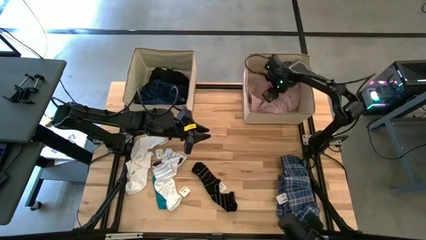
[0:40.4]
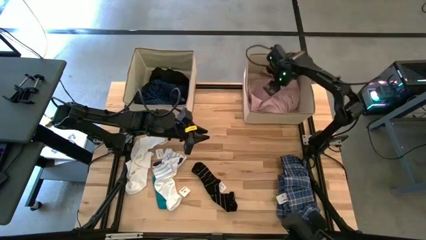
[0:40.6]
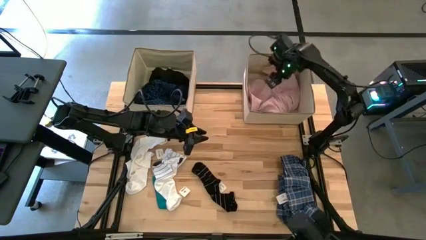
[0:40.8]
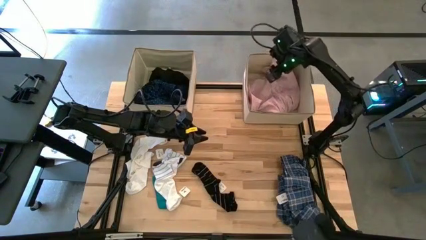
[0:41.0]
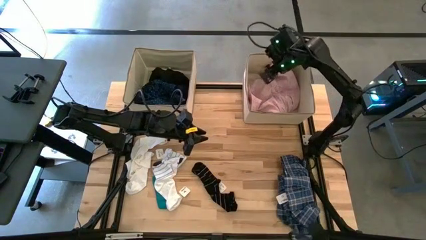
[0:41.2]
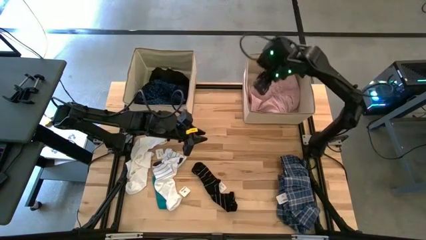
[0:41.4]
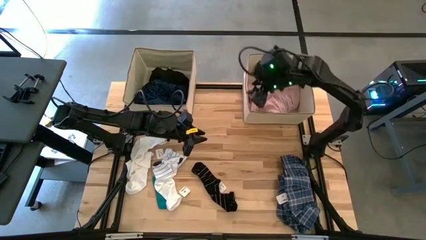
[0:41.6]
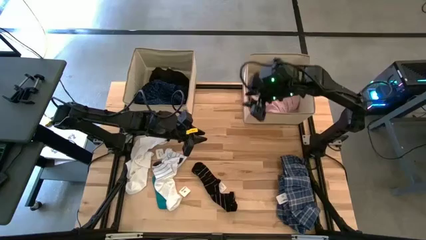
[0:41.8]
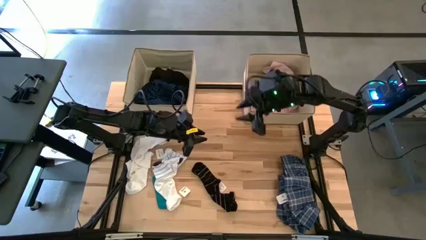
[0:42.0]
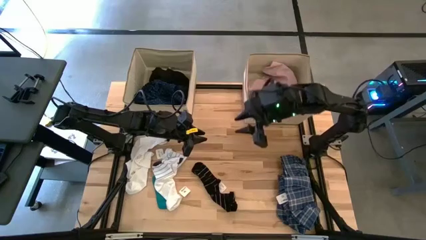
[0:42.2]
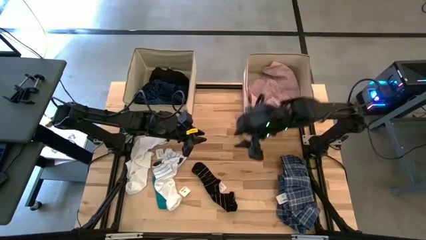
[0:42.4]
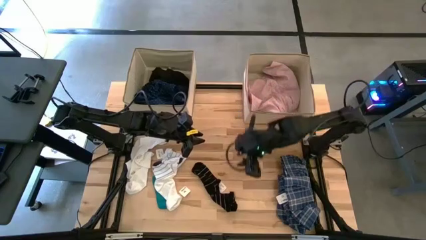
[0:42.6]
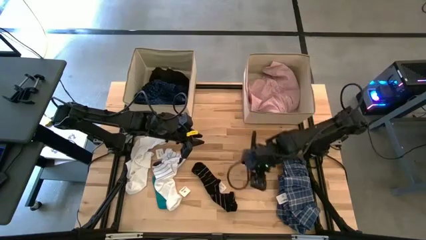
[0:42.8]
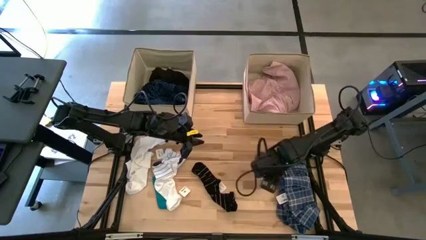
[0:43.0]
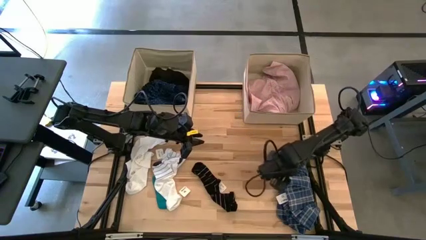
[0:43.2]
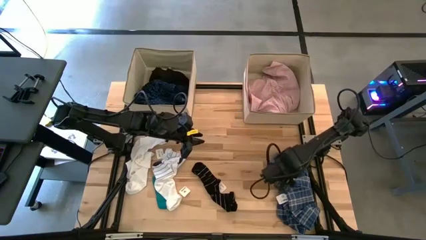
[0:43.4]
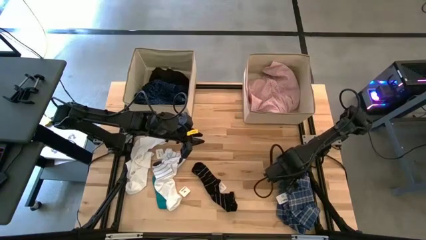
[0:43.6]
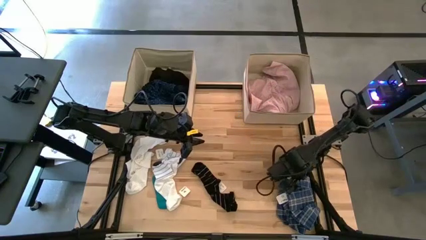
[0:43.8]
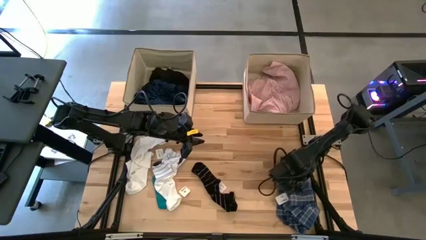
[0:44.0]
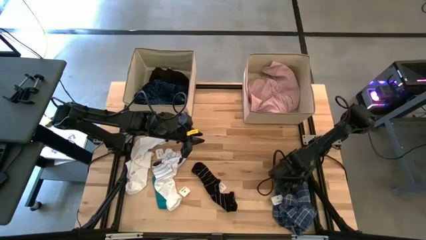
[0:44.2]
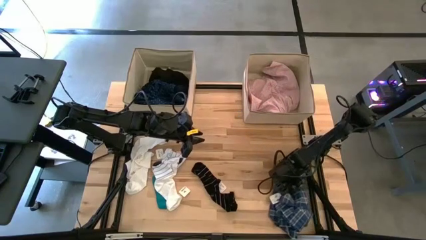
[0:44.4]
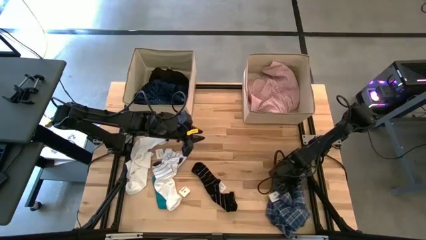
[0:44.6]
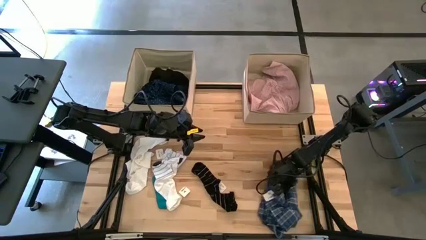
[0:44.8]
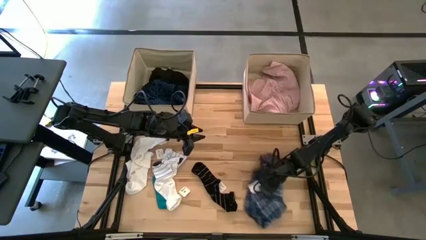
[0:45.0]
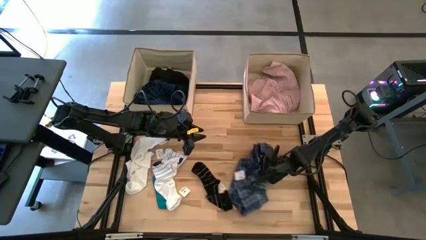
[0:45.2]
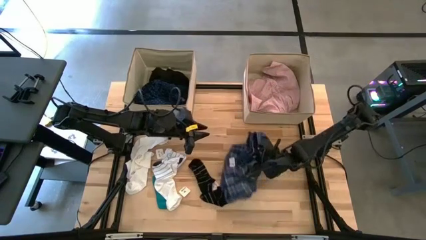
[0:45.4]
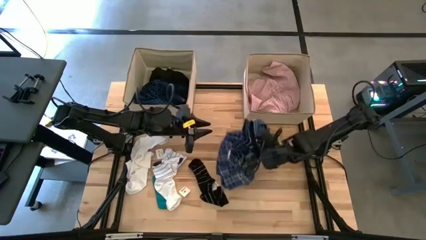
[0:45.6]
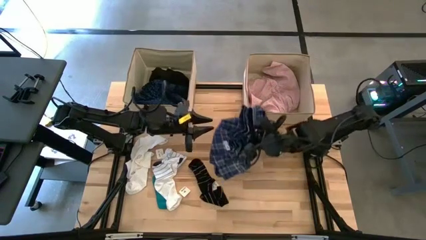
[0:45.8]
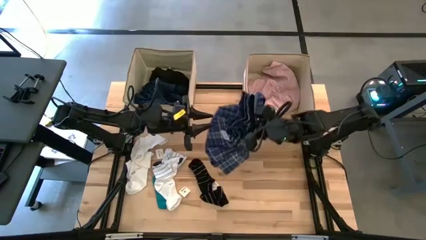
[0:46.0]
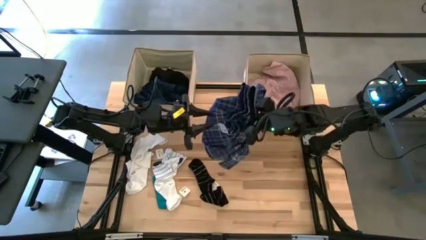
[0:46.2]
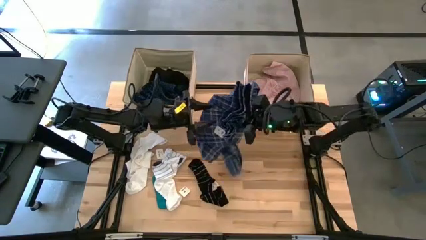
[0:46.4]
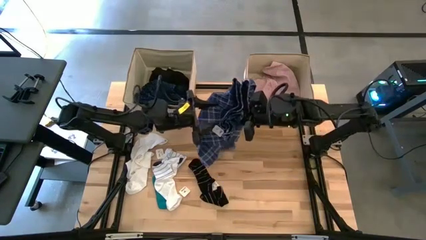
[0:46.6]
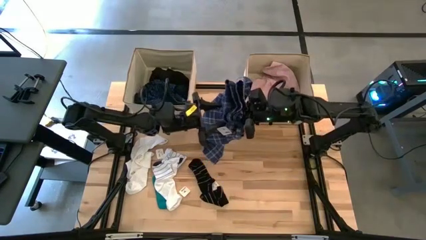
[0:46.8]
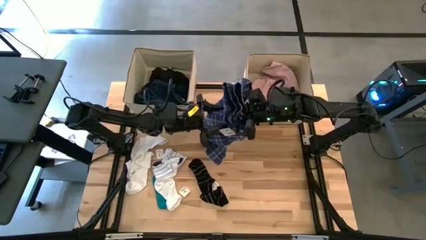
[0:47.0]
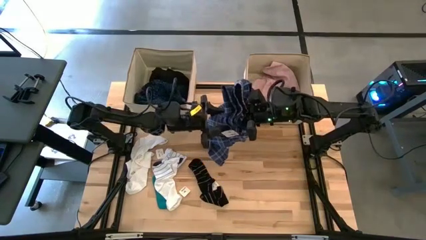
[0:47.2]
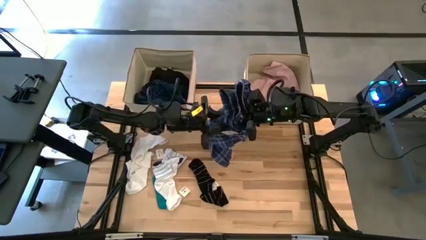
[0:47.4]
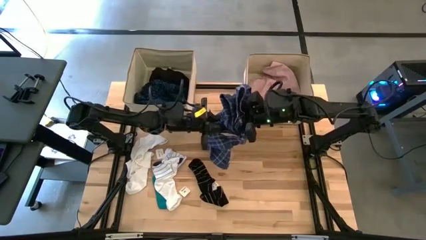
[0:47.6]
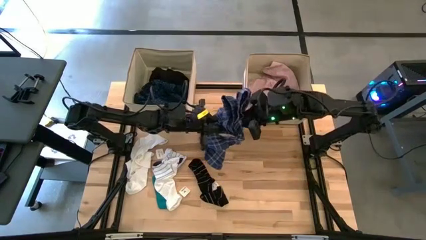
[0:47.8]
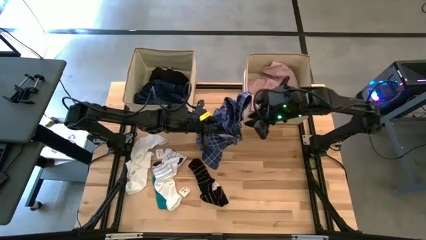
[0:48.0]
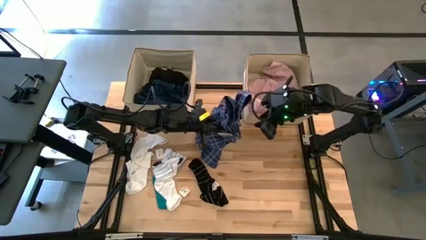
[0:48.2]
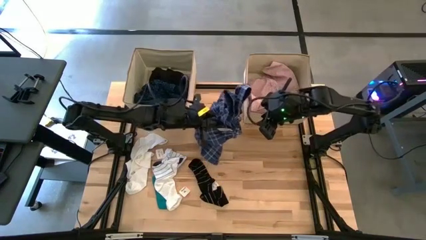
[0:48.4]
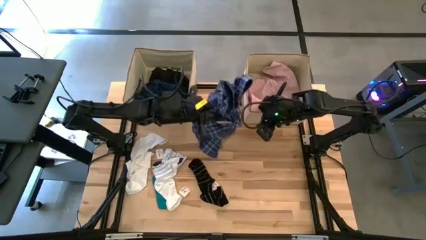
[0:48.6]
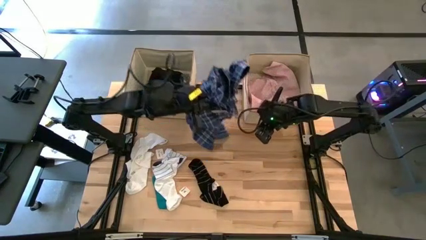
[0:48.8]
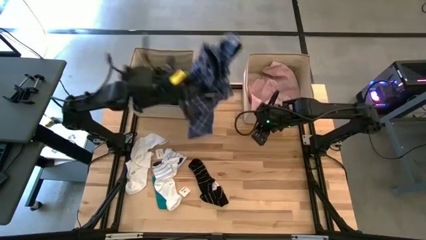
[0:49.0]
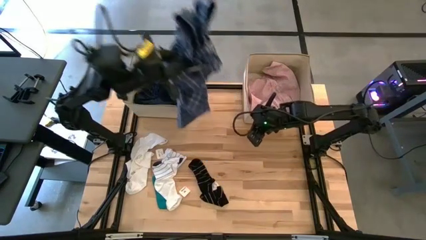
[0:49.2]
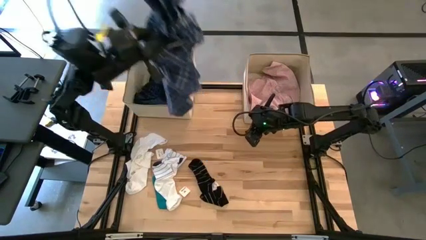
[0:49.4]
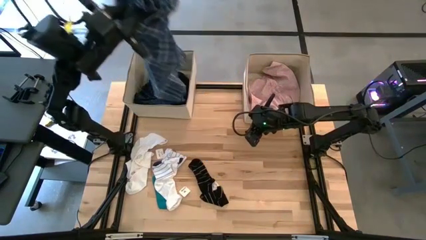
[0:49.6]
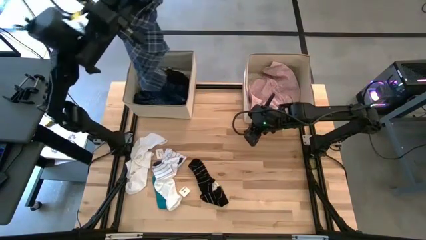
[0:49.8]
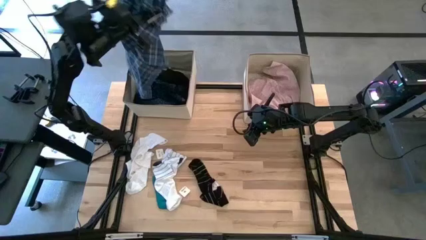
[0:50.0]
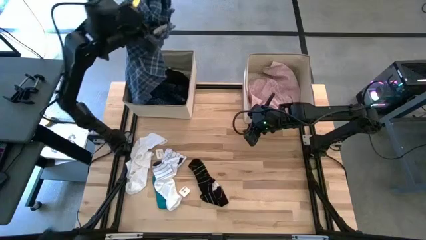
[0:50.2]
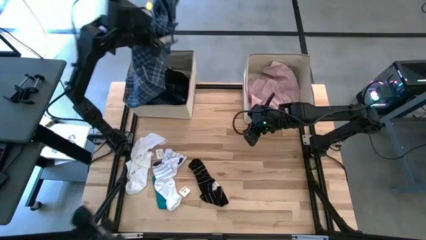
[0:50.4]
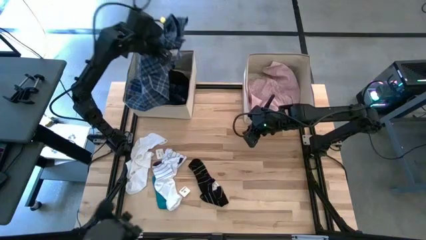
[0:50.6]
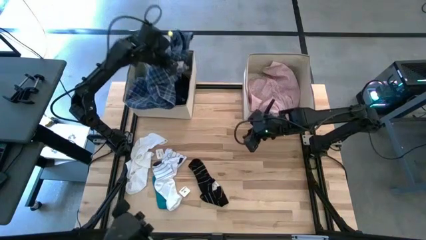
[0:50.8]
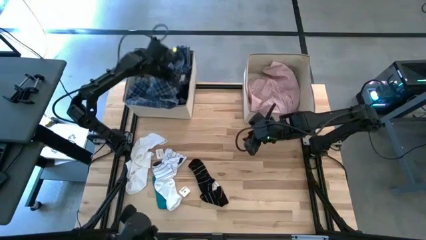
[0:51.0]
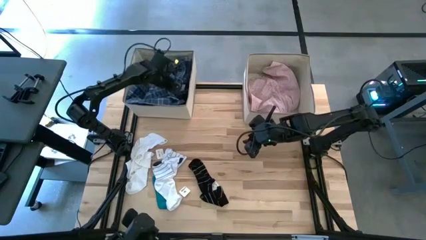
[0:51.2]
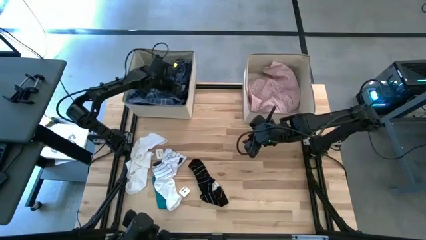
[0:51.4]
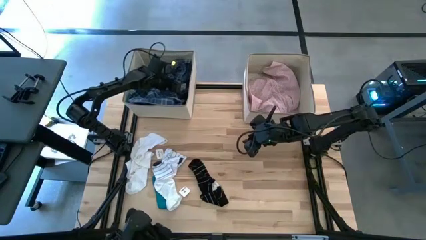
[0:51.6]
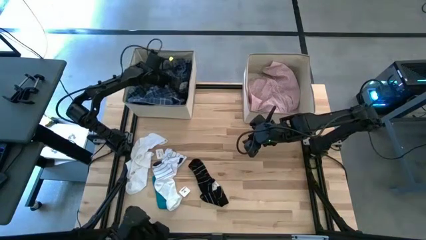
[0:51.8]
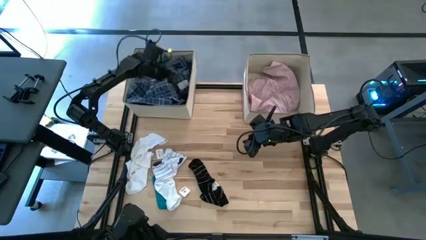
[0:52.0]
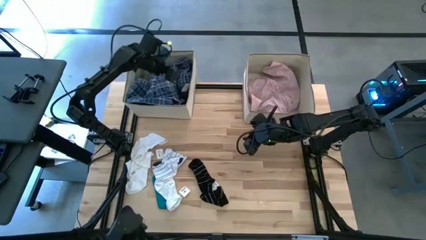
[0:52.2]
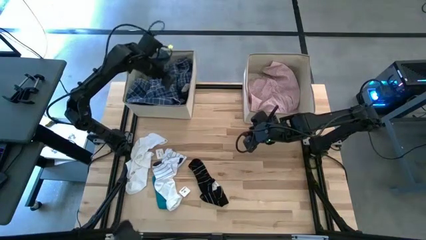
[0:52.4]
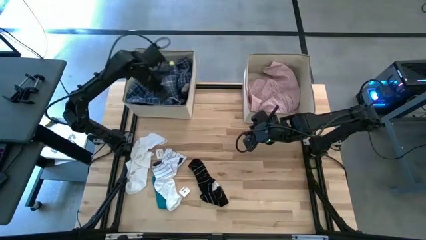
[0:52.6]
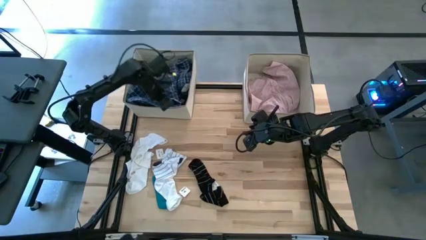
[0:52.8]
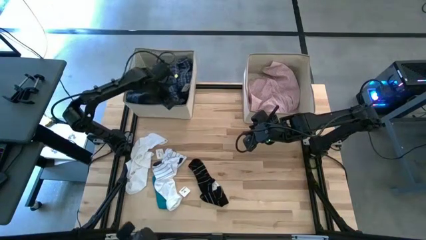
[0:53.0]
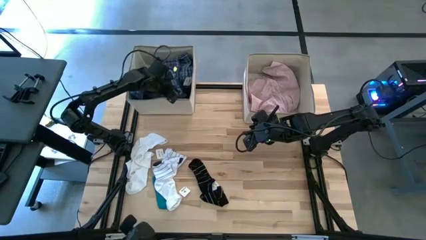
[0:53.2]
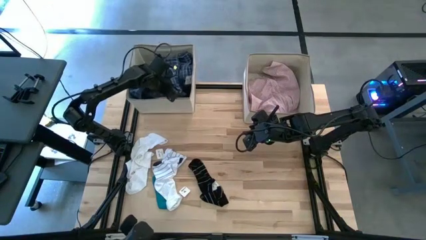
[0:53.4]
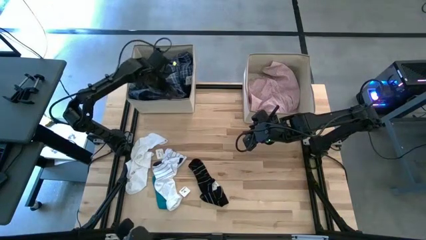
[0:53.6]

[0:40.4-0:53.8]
Task: Sort clothes
Put the dark blue pants into the left laundry organizer

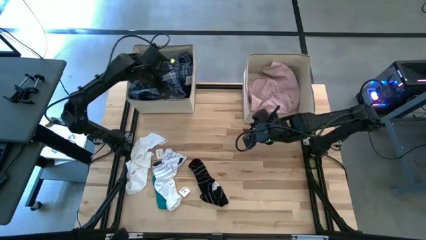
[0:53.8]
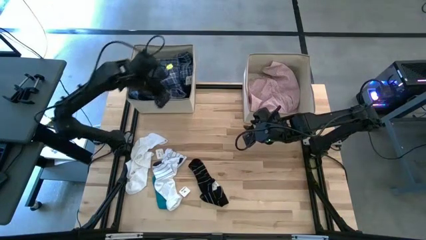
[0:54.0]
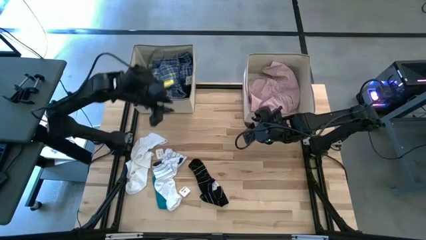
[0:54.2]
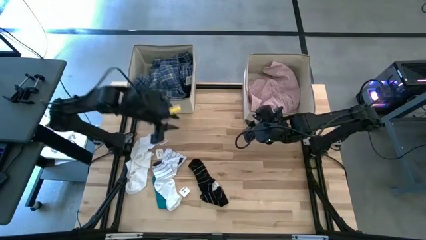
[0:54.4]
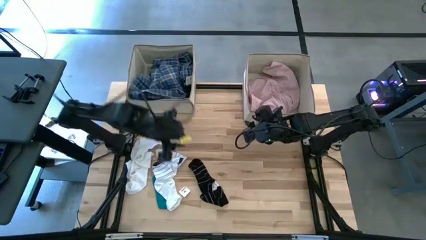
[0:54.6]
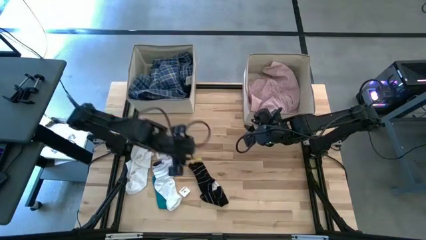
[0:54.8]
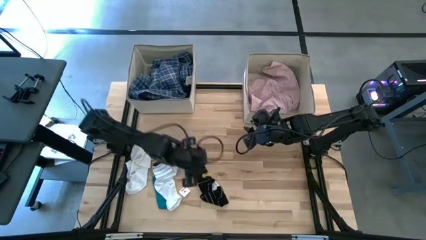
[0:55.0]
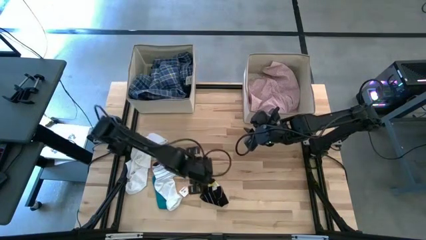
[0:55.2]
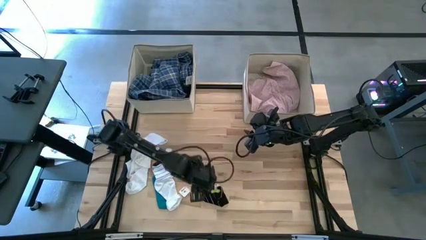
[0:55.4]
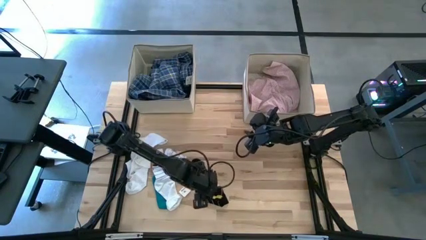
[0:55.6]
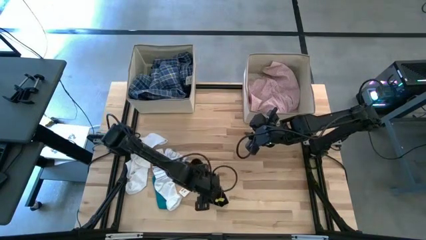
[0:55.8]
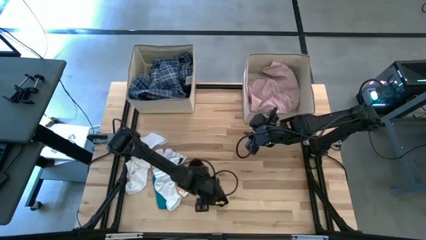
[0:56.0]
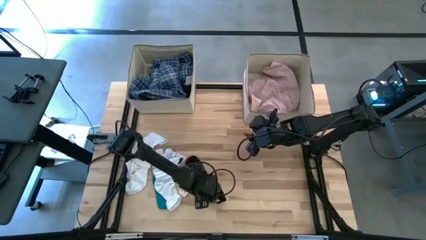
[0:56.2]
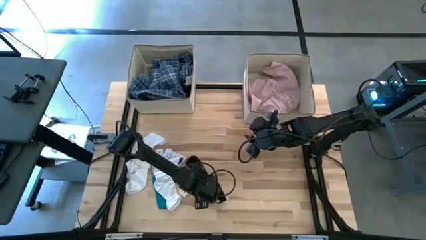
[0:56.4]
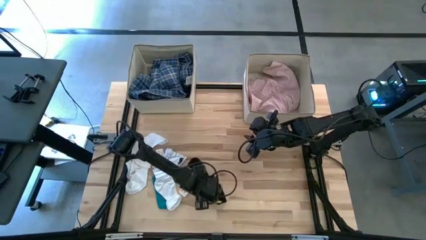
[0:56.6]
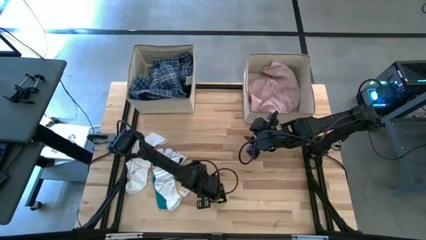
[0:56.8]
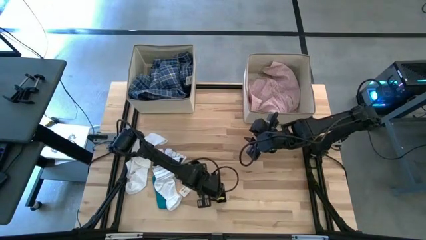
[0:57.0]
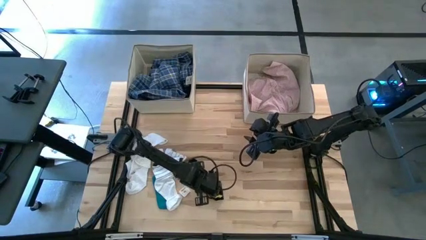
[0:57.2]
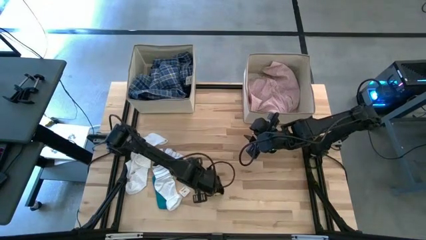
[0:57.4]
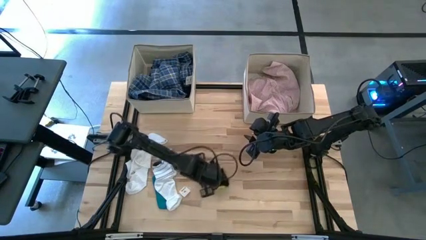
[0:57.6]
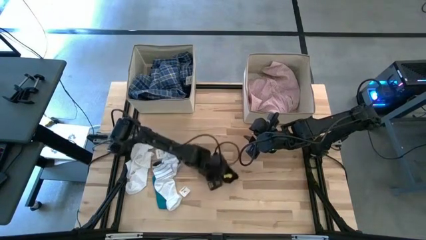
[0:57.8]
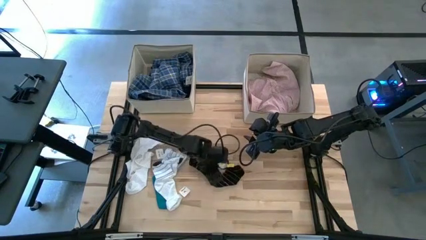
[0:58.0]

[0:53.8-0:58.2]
Put the black sock into the left laundry organizer
